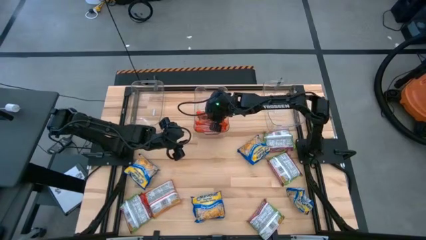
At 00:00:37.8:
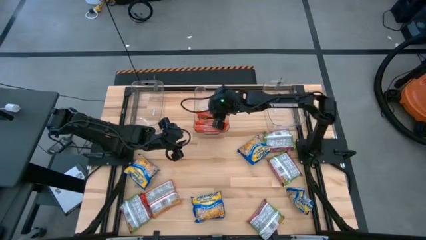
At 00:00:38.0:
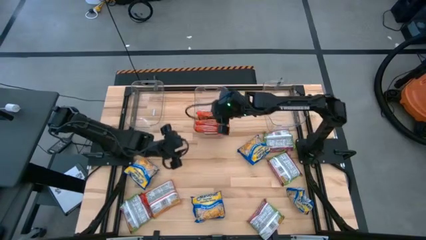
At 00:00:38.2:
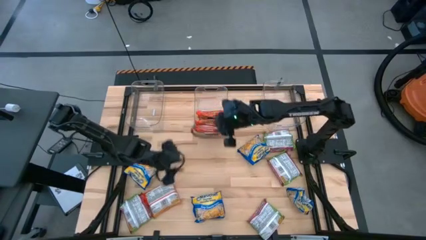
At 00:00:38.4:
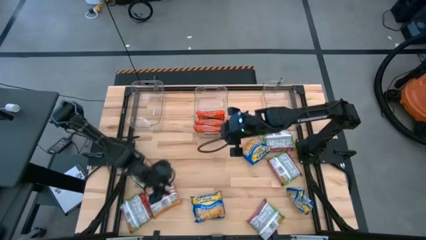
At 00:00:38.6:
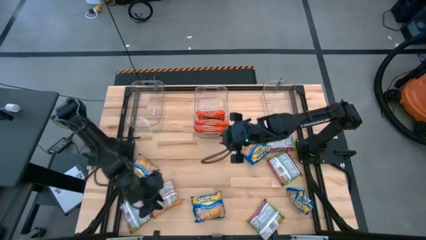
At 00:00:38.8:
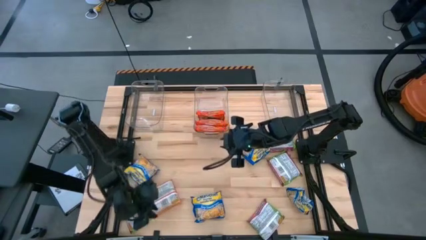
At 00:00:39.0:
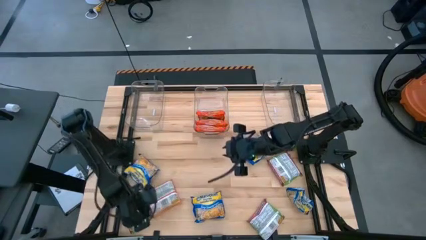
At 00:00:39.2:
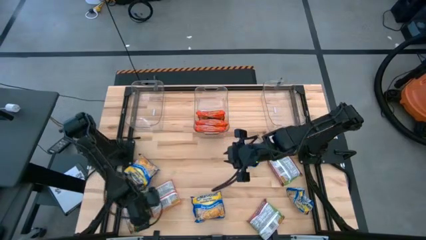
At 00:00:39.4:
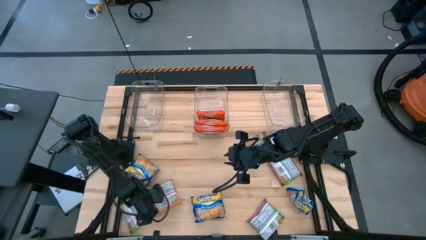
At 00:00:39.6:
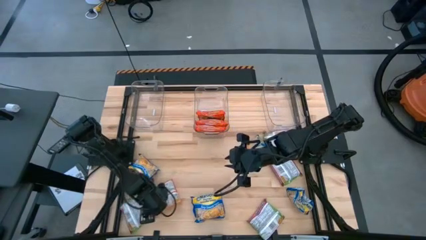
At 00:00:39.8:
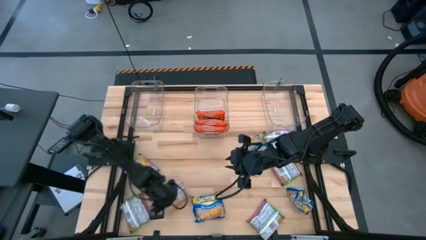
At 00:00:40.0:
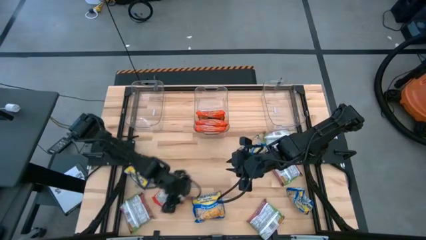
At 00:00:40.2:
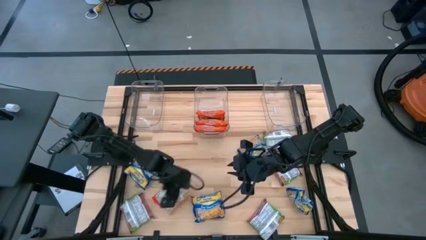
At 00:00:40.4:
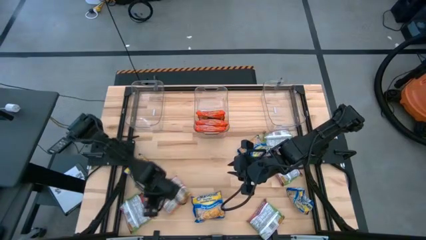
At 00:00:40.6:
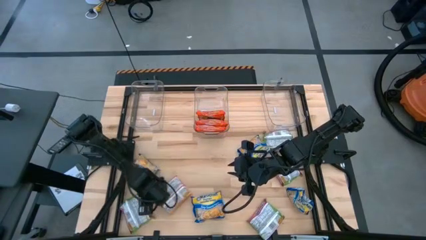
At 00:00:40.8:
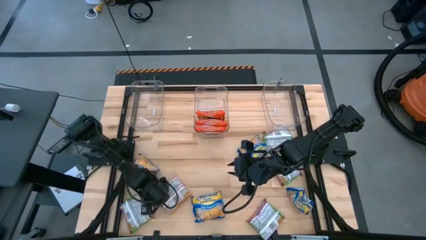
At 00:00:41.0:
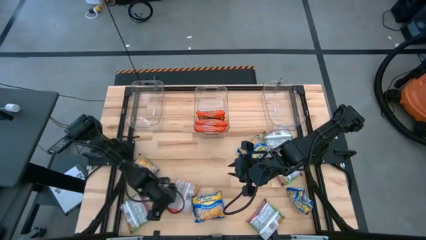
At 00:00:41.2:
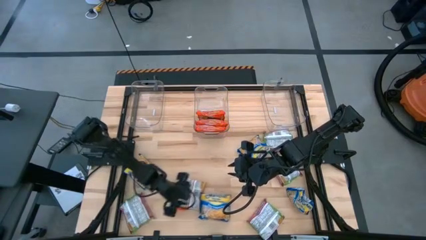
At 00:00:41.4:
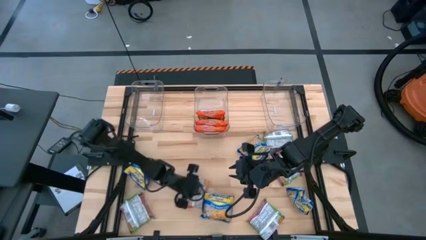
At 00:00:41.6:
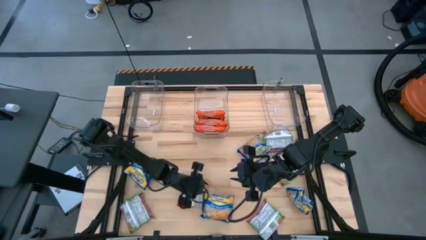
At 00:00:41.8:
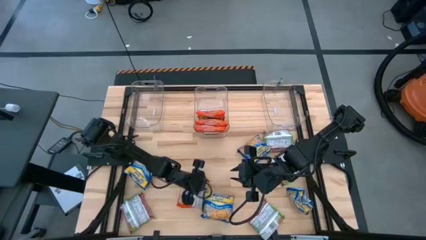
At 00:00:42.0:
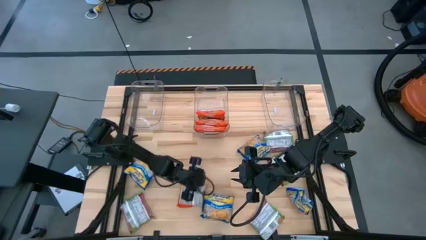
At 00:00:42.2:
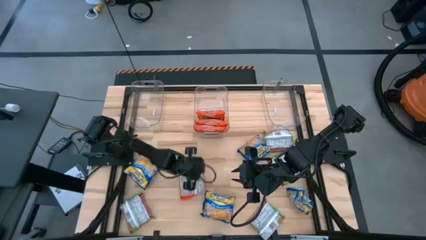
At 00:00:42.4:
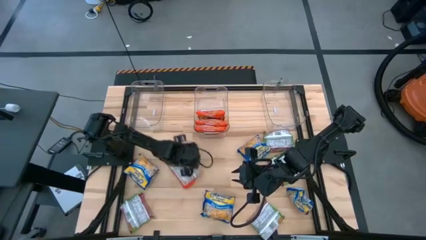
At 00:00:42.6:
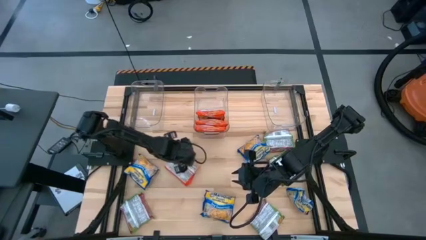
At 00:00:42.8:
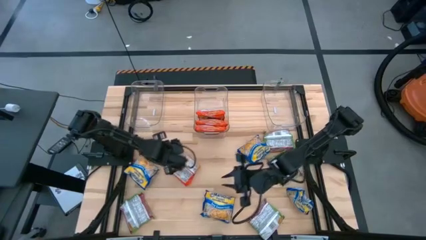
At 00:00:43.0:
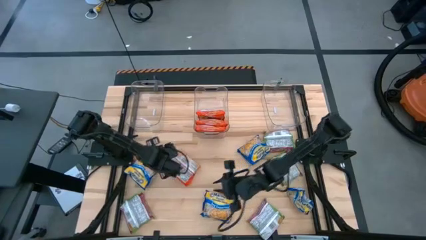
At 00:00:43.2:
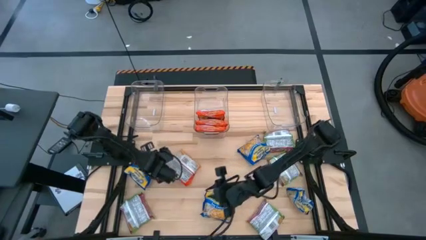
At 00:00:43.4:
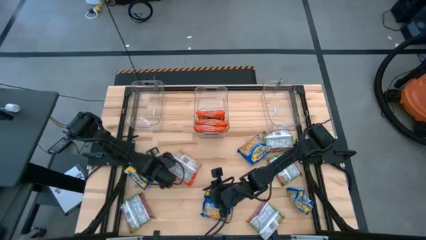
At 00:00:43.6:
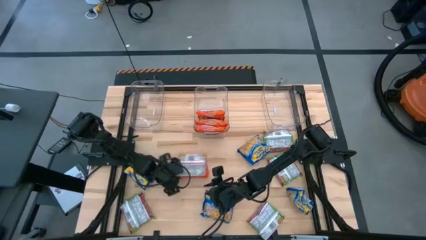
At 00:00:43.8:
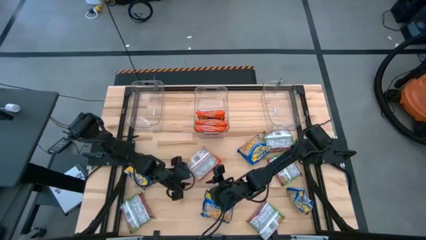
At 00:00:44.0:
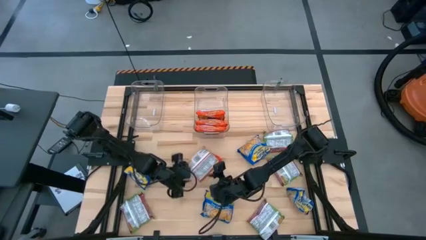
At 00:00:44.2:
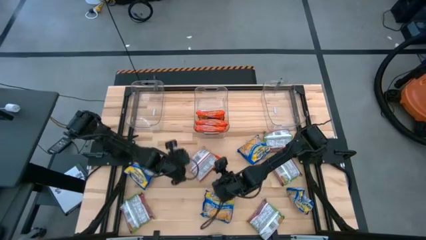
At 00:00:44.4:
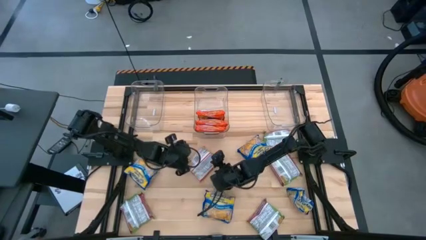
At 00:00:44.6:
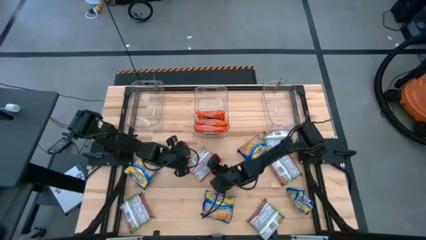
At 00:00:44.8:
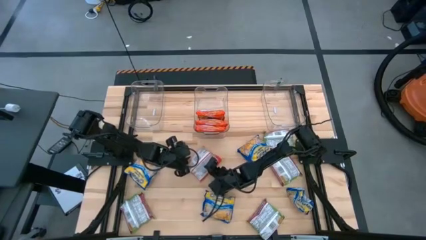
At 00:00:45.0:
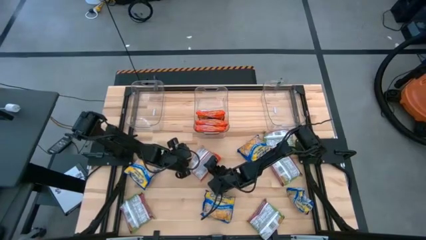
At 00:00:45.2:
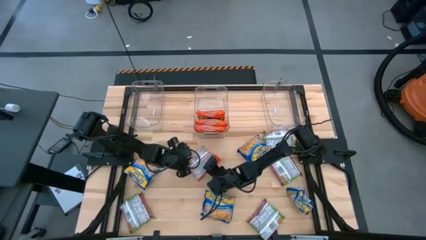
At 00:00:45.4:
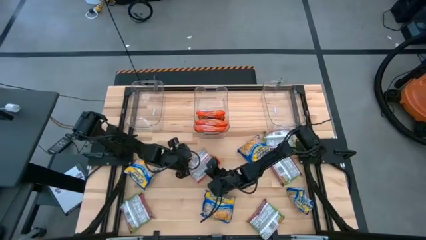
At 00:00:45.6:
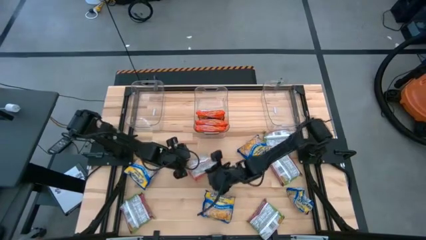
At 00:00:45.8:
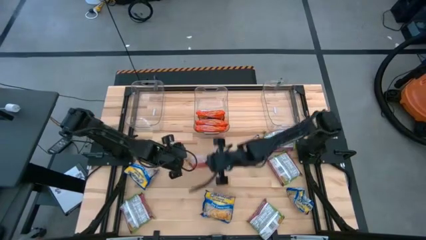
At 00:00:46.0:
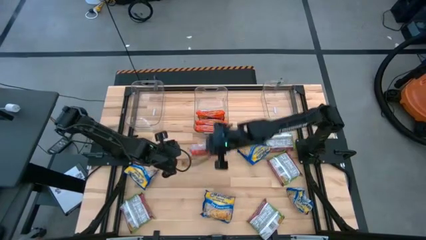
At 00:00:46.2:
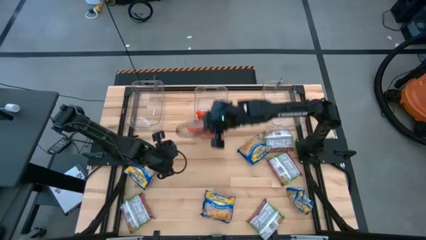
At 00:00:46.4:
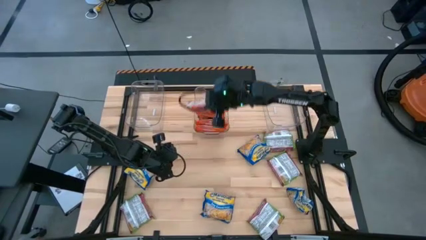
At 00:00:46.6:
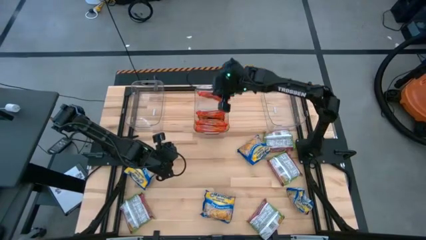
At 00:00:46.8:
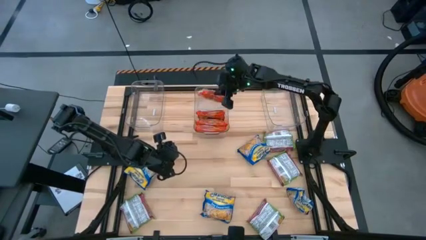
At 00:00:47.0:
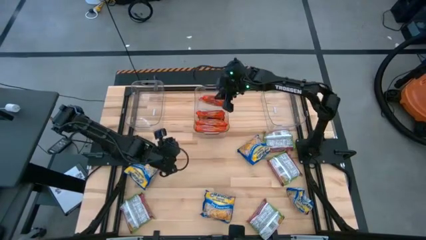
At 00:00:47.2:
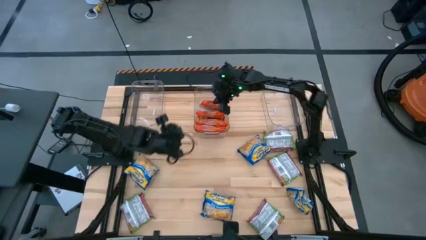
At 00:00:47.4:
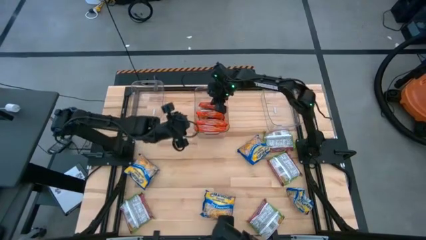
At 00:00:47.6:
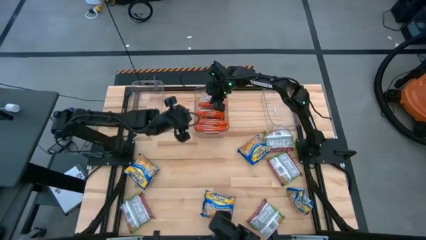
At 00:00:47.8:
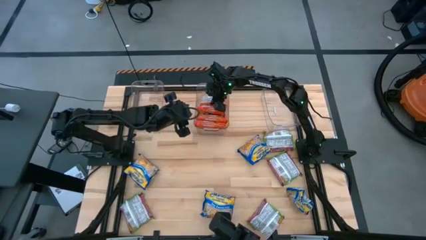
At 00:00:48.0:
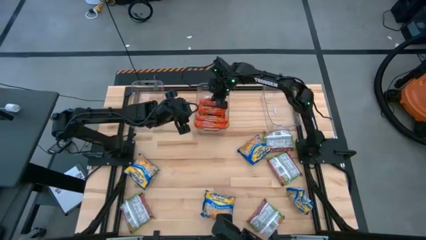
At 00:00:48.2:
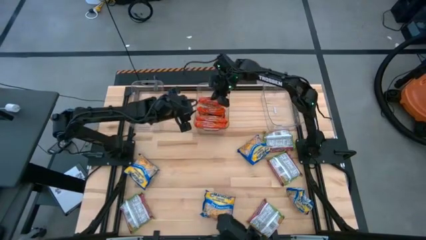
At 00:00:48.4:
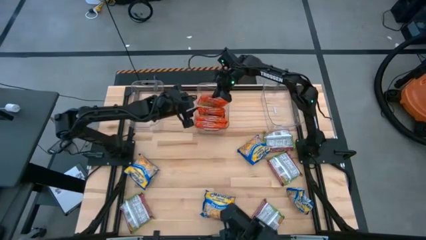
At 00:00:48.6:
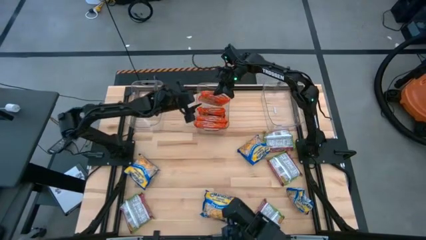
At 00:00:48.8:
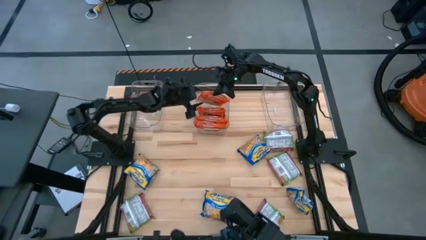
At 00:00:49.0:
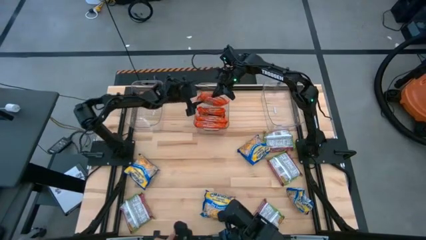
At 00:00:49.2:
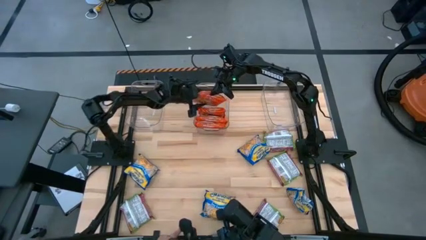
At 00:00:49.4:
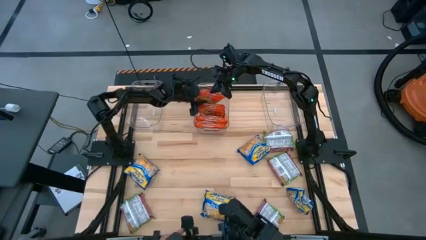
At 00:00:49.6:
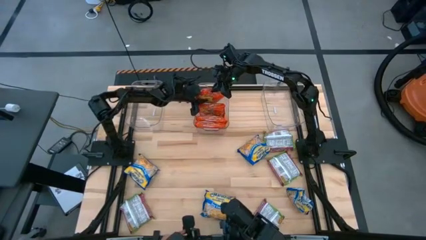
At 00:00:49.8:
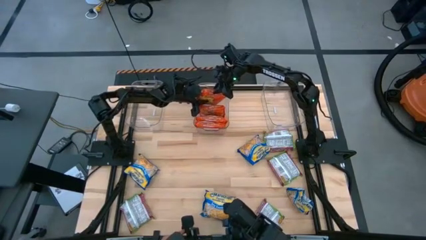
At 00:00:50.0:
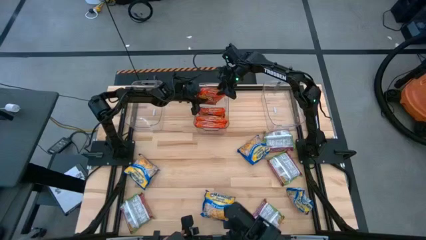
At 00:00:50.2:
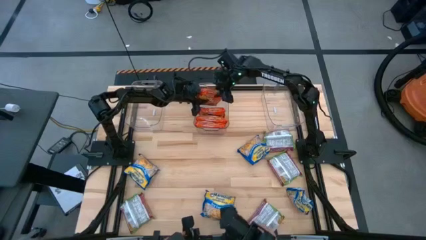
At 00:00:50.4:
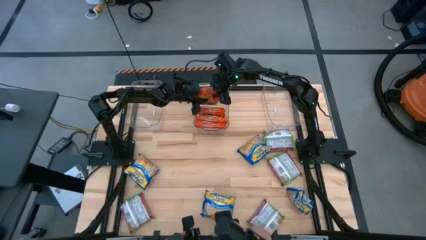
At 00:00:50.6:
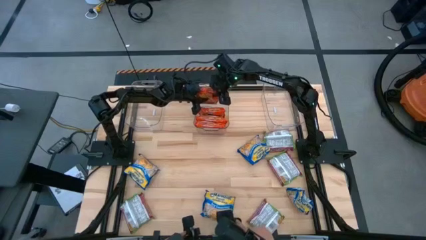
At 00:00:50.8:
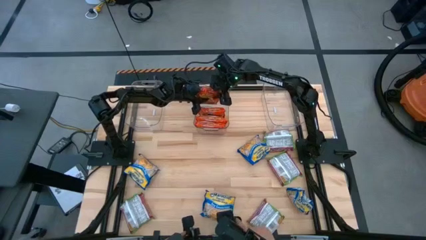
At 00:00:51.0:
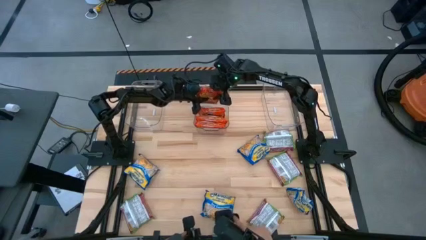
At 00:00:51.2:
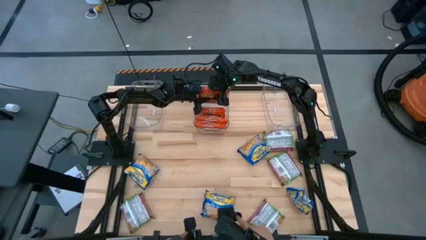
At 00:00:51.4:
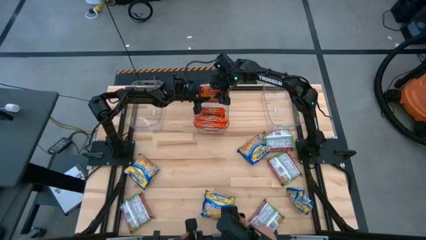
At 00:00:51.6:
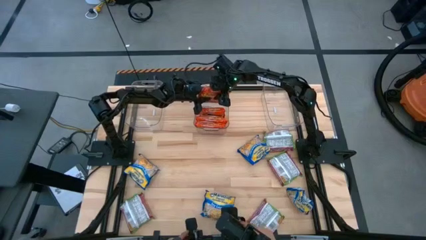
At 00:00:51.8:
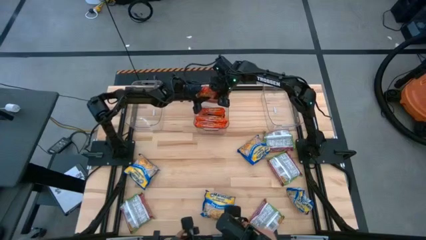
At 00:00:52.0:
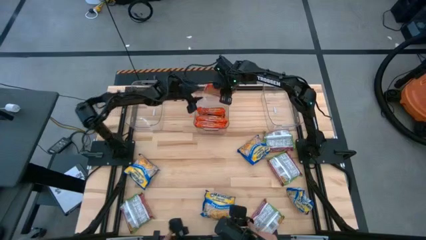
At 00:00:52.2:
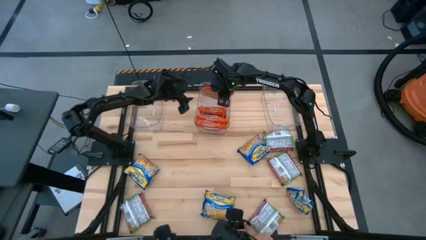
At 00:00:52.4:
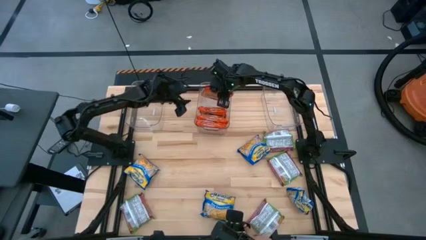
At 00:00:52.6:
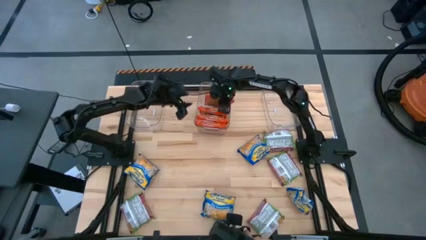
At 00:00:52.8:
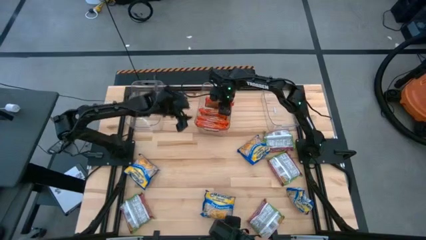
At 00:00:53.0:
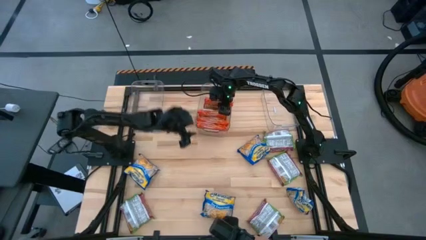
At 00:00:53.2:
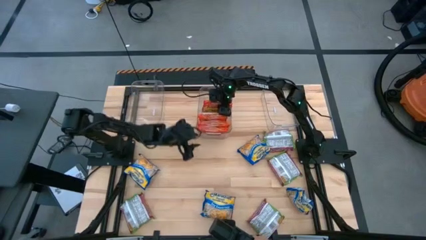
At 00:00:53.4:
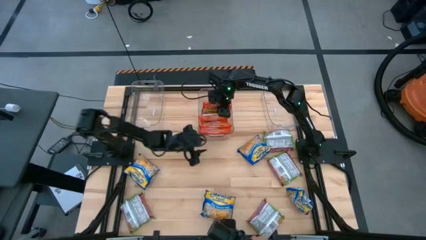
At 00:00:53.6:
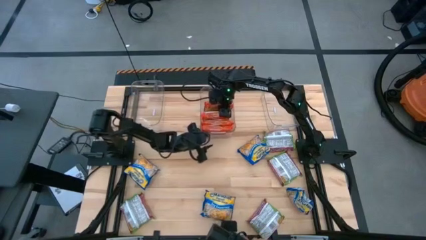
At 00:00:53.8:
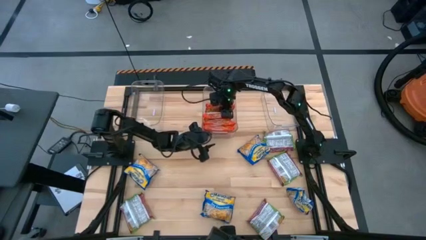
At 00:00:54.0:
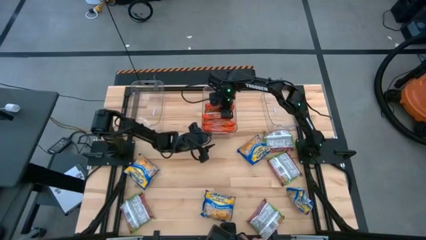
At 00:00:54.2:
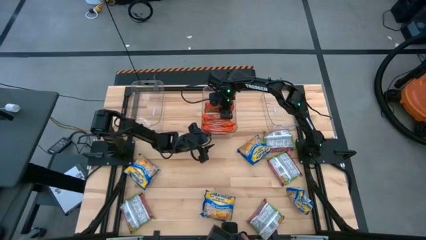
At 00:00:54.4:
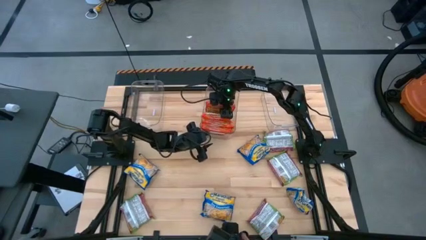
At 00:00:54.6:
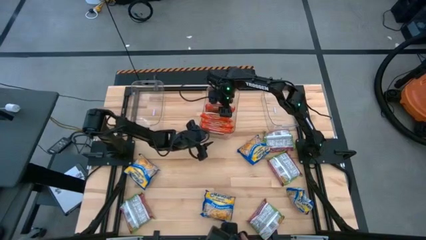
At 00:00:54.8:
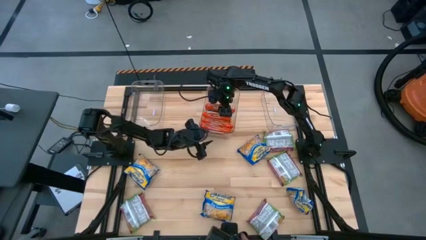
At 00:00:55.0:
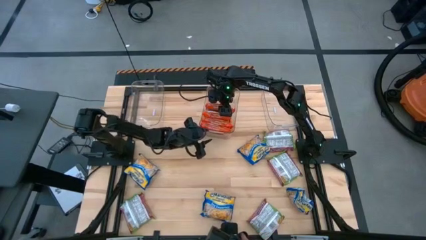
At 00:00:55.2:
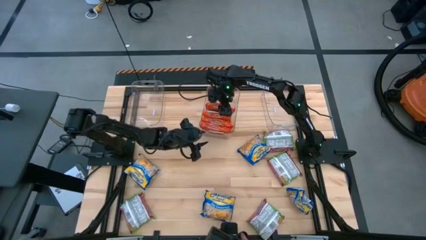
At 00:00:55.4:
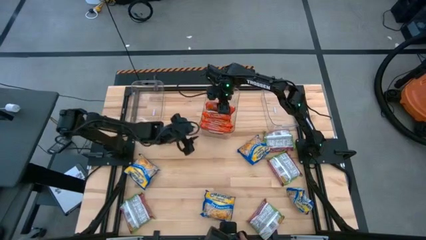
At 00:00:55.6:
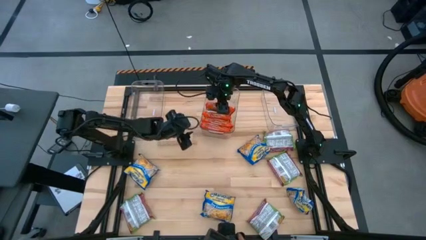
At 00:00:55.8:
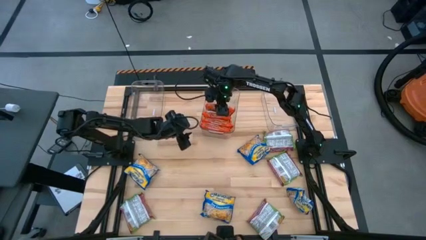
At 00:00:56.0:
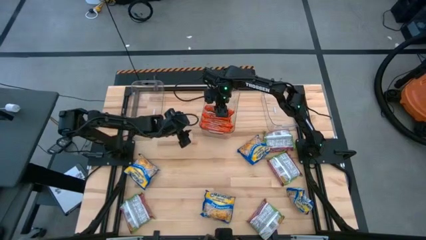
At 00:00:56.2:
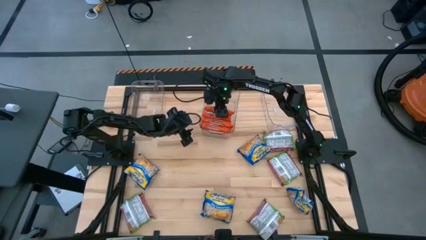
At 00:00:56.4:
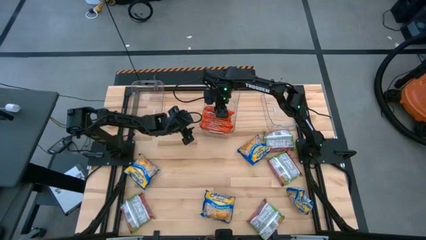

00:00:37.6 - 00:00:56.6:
Task: Sort Maruchan noodles
Put the orange noodle pack into the middle transparent bin
